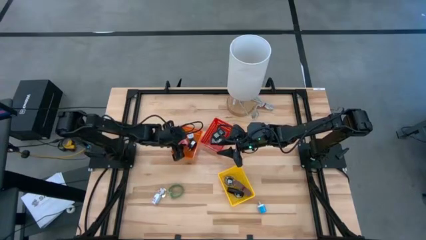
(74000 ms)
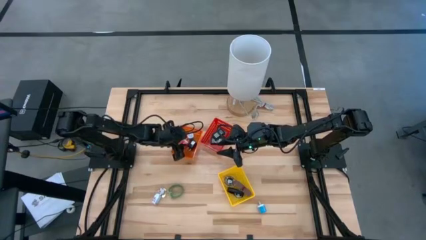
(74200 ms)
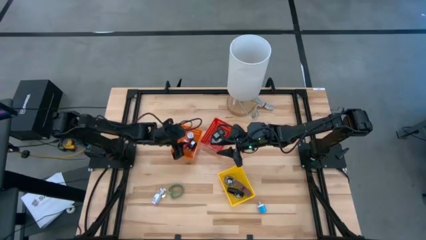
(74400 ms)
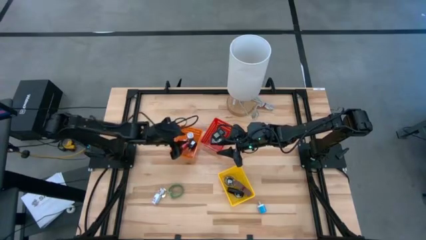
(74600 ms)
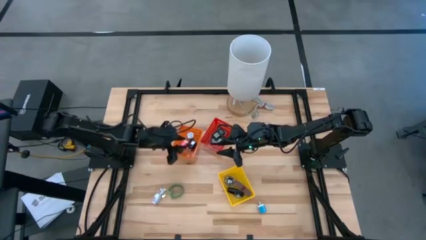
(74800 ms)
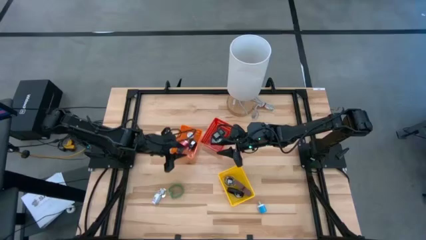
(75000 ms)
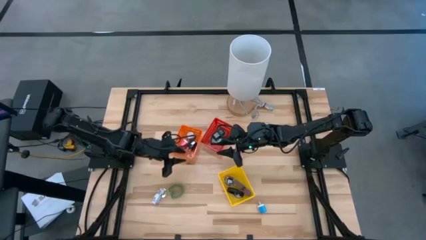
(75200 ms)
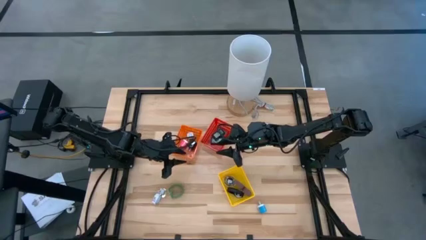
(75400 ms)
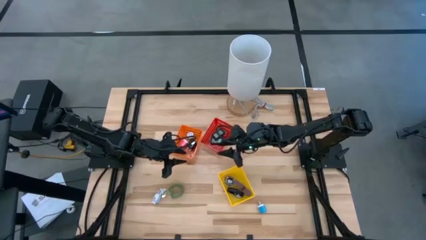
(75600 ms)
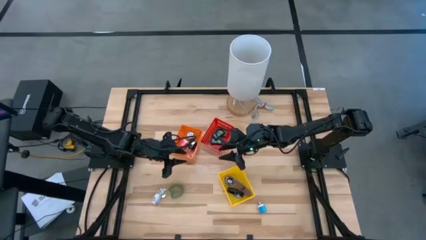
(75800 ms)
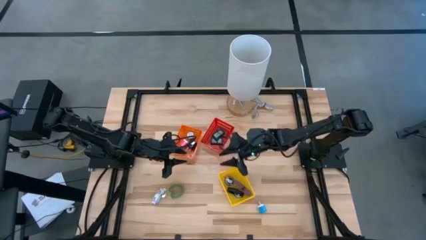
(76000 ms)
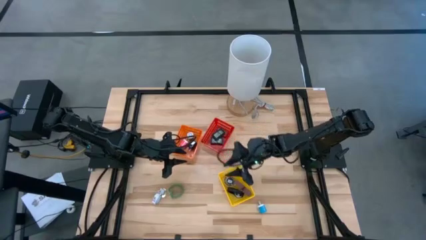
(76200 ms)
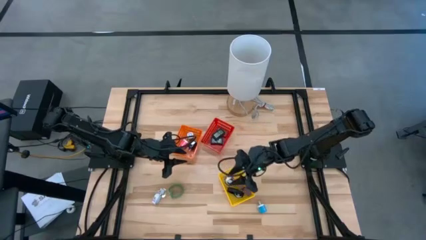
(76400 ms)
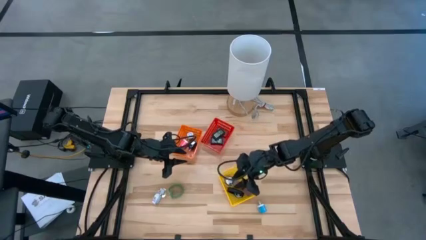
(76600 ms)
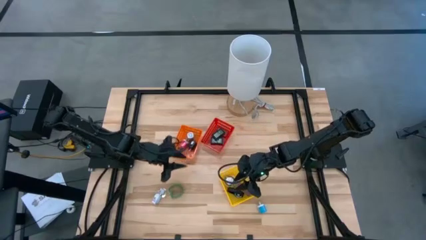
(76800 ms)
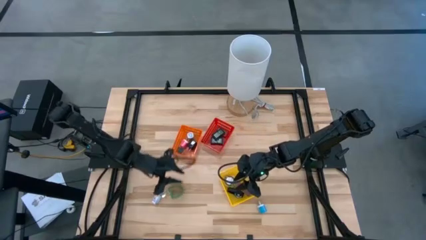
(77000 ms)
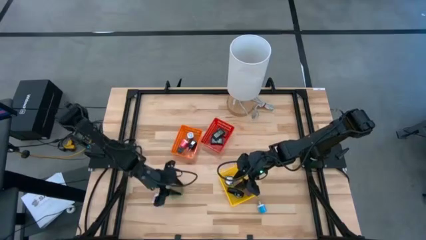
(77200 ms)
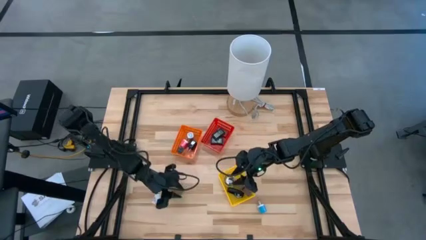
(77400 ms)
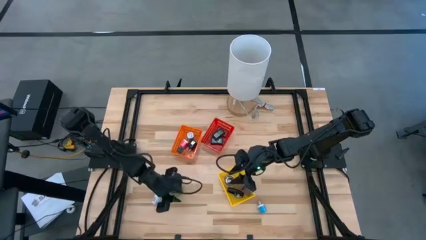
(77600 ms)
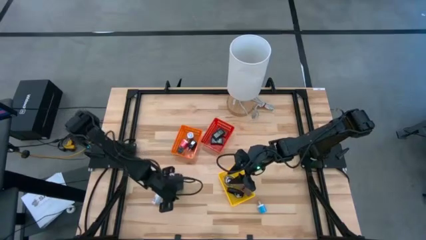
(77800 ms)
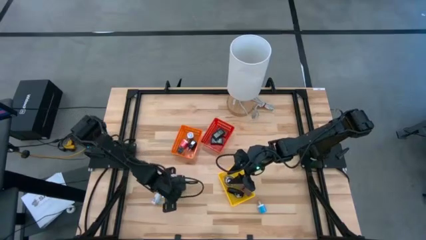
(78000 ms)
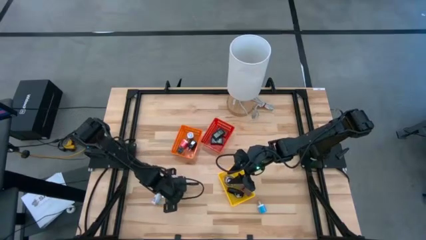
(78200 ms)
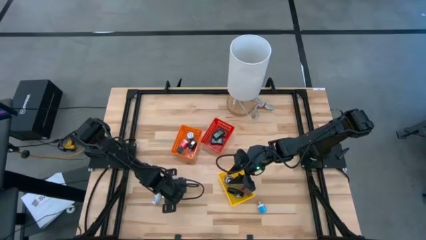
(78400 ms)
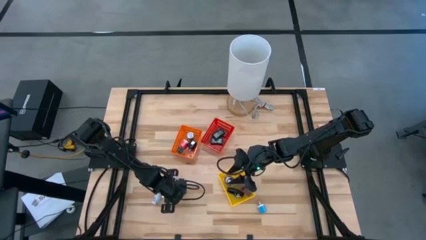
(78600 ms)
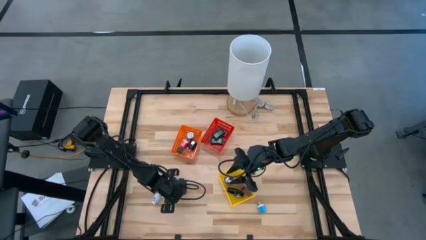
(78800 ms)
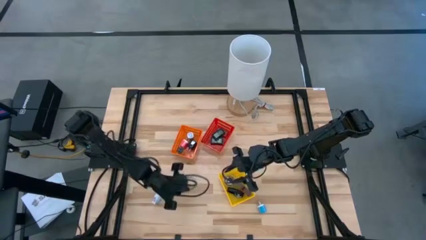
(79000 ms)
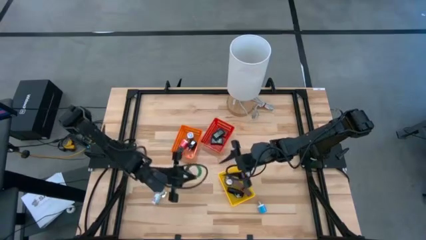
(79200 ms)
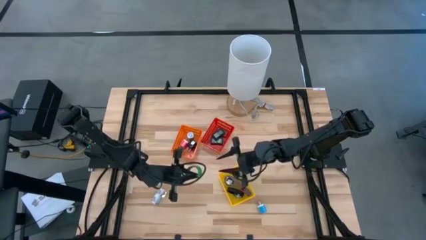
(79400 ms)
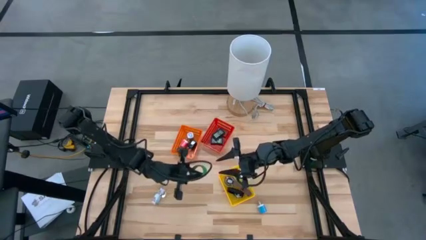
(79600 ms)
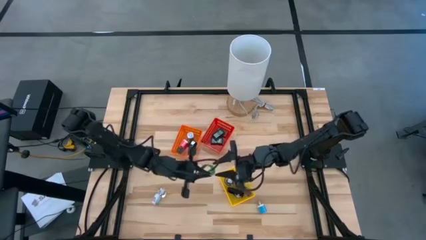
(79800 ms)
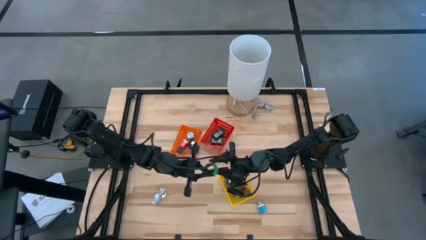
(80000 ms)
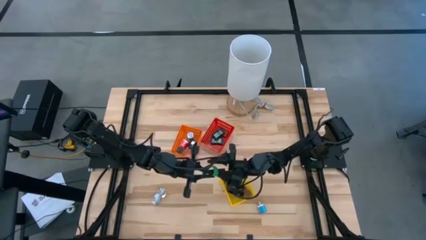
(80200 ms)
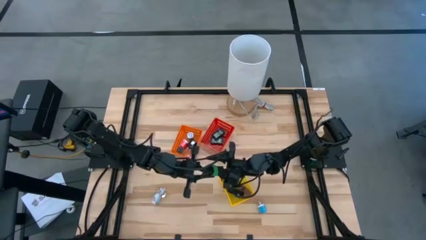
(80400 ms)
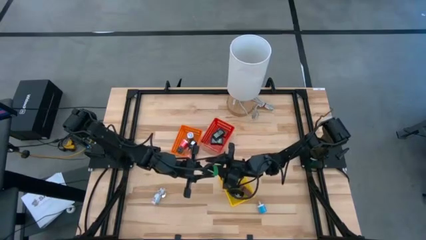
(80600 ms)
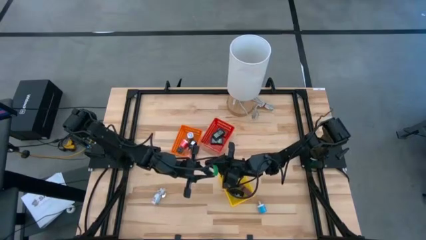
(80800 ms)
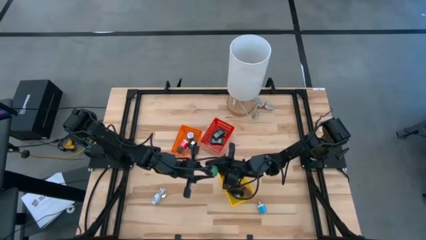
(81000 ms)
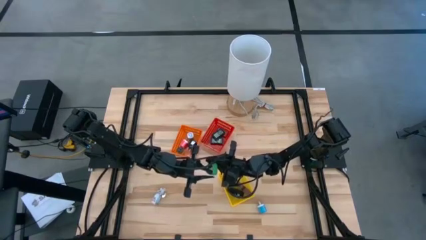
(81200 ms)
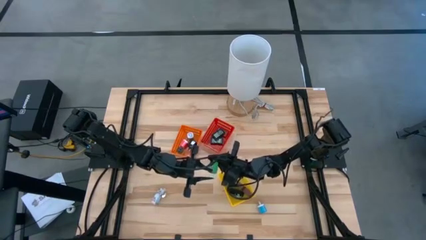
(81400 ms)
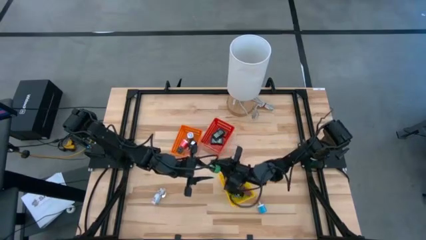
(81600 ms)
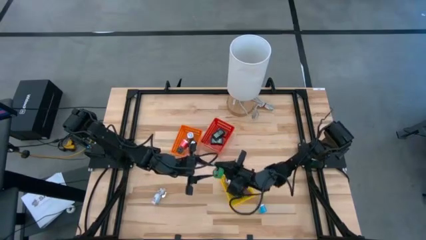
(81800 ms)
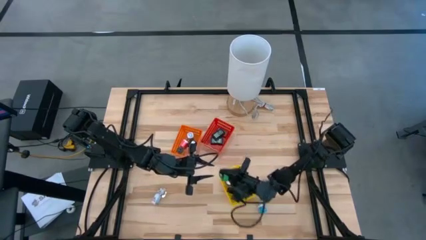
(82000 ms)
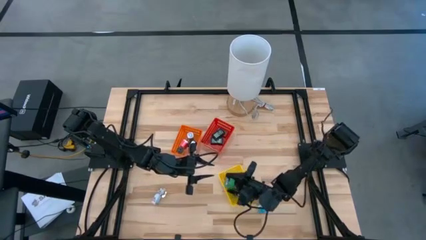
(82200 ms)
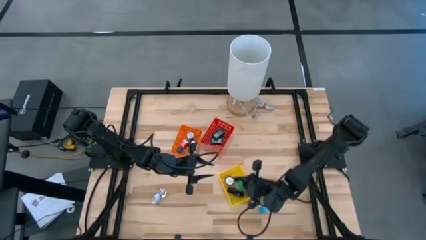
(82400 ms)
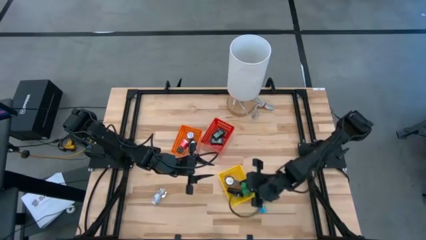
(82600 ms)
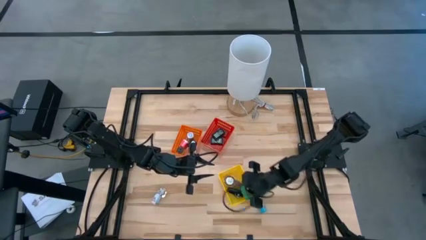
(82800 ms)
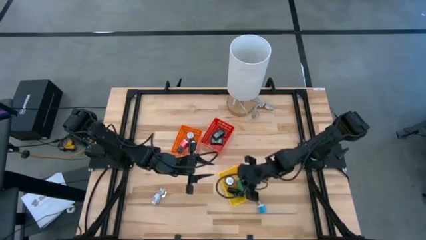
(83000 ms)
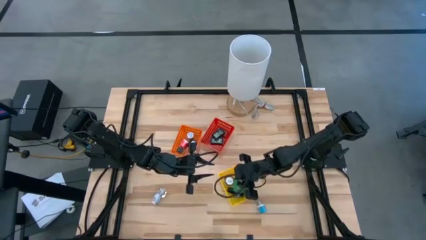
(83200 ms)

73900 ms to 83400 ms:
Task: Pick & Place Office items
Put the green wrist watch into the yellow bin

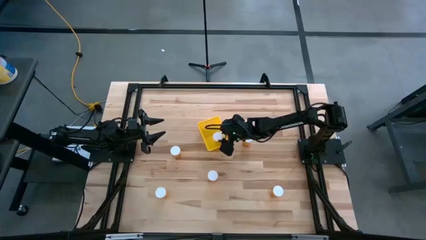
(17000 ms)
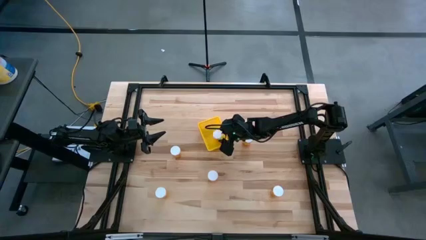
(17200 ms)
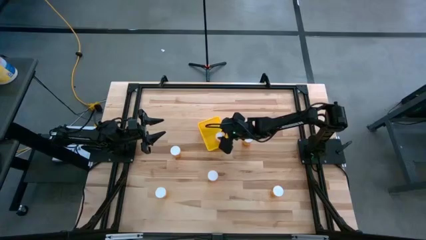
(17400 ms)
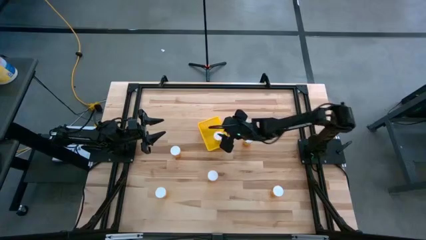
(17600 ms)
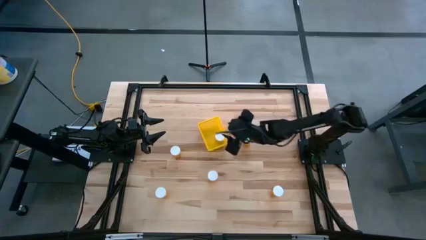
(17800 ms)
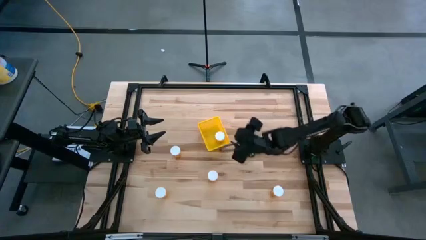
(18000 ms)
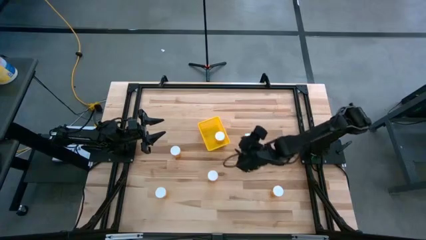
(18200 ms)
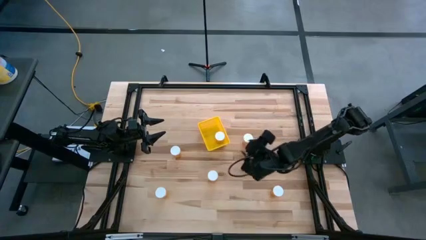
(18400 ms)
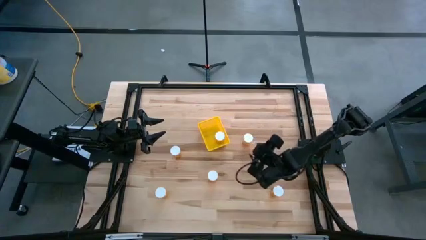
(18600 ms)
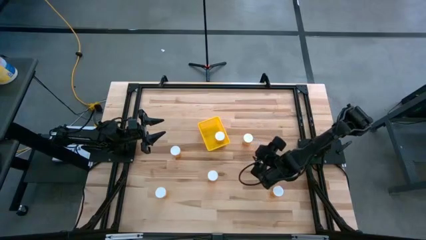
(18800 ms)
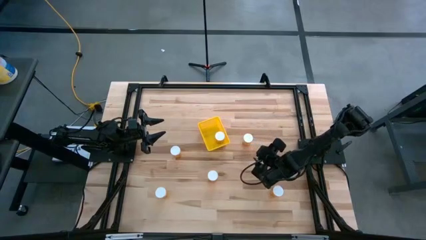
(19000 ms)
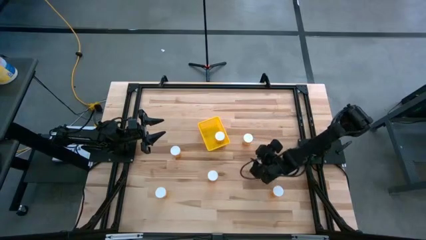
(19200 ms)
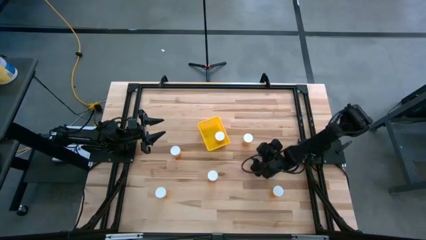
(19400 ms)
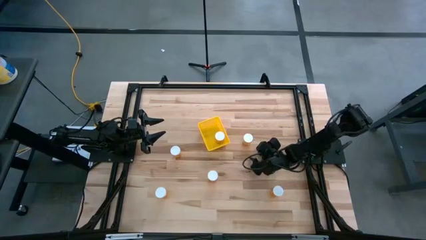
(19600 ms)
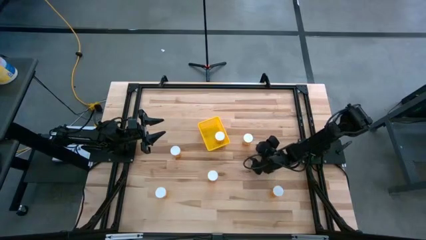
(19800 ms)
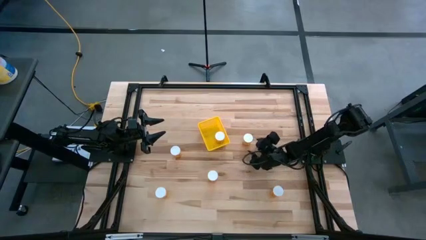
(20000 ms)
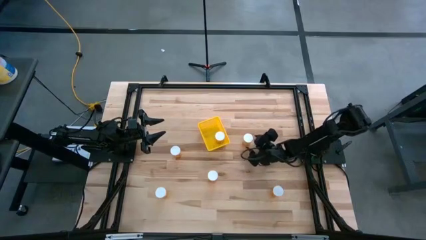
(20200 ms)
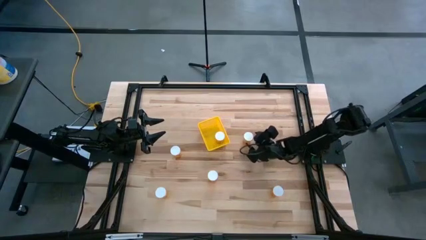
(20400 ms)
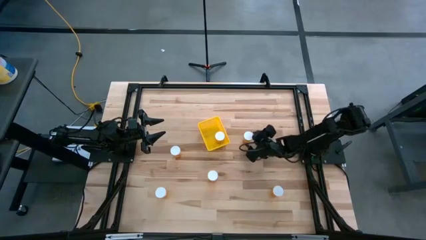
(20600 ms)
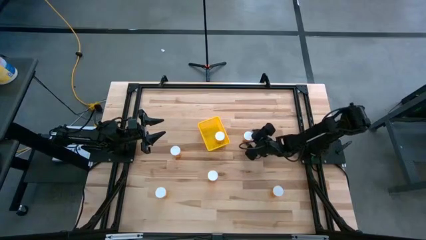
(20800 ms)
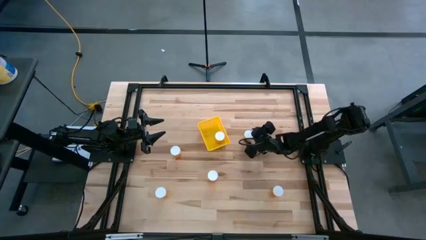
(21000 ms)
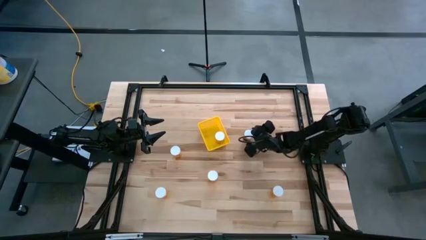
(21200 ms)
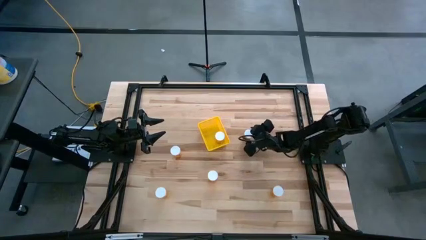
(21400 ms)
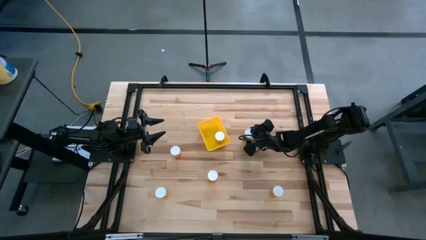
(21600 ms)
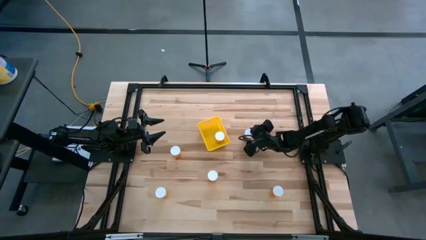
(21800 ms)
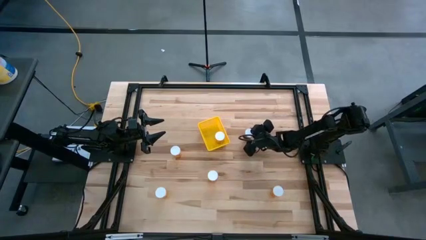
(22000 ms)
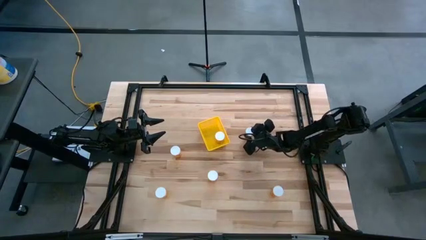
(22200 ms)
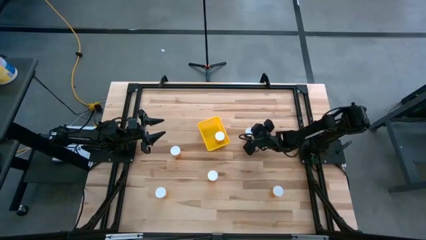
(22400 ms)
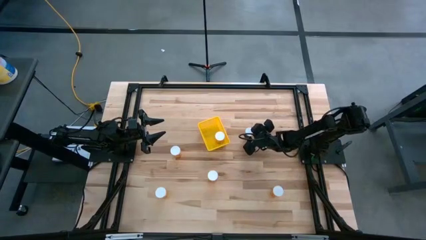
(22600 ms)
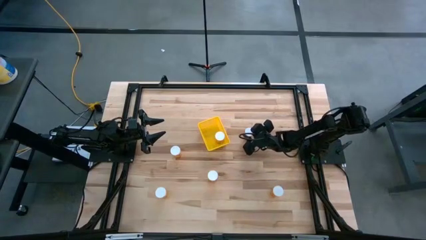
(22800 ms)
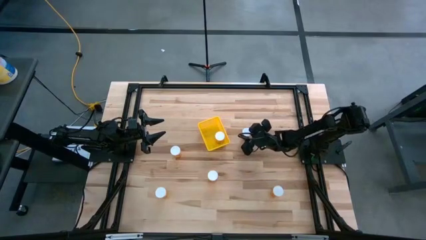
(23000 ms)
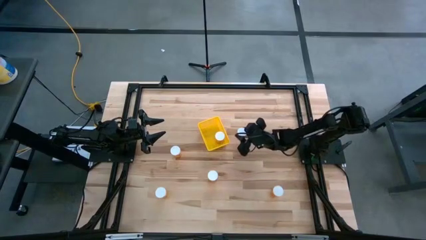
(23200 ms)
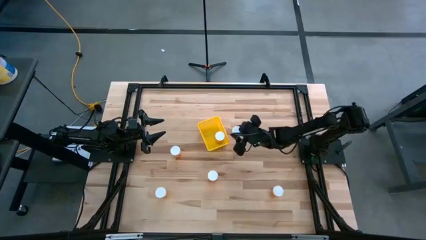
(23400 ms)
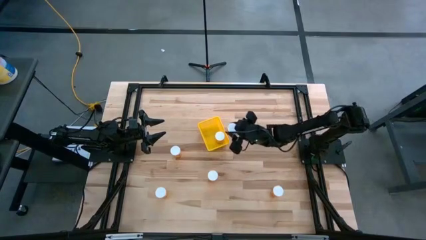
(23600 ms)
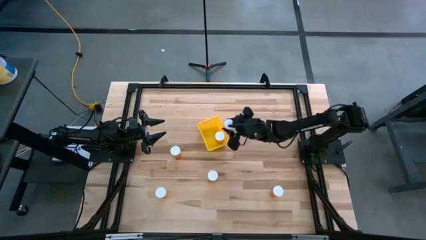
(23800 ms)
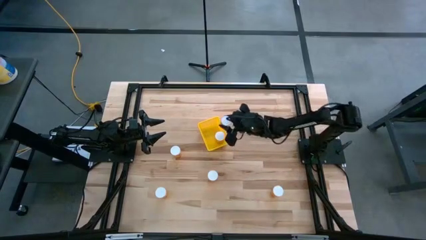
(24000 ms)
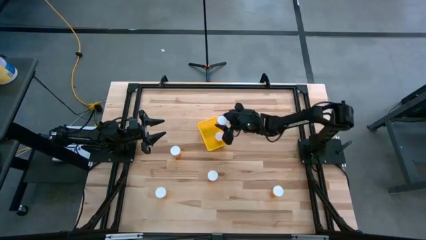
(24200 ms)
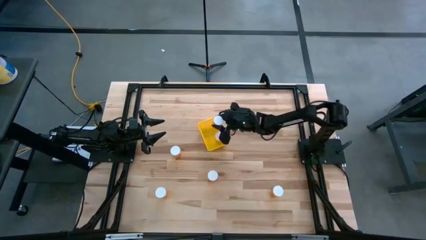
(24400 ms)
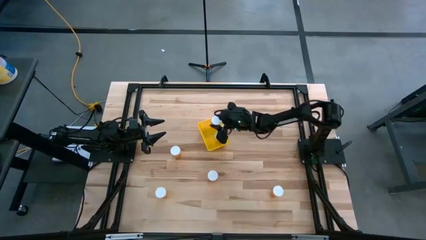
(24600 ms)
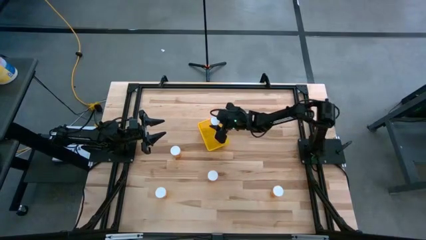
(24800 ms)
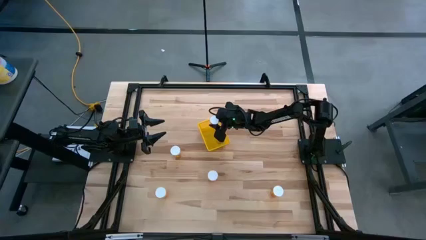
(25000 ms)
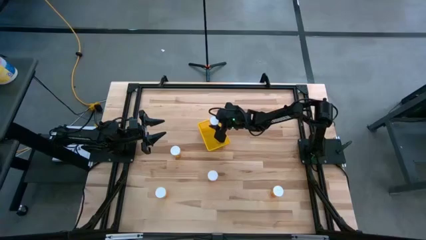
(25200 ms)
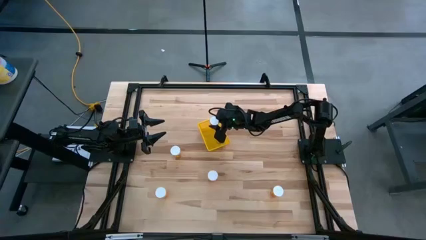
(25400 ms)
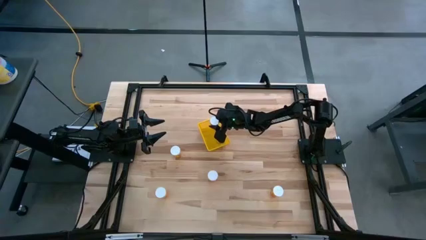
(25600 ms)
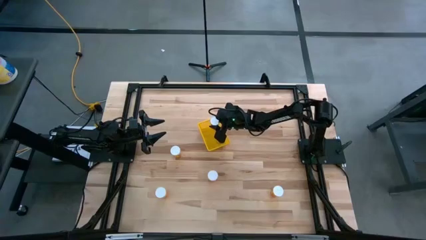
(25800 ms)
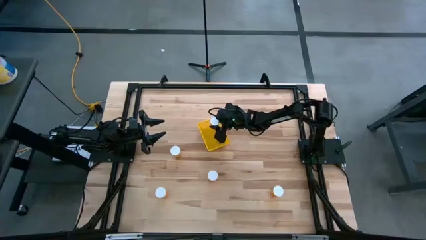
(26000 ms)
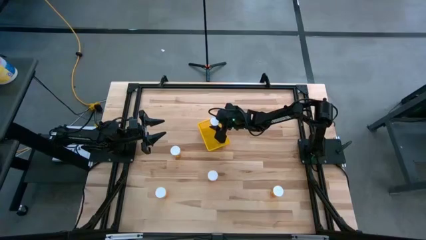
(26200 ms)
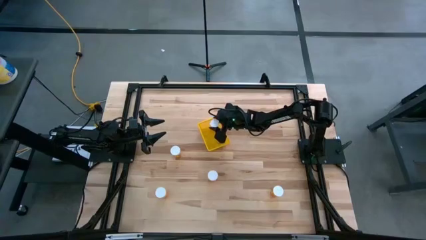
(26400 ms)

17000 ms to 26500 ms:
Task: Pick and place pill bottles into a basket
Put the orange pill bottle into the yellow bin
